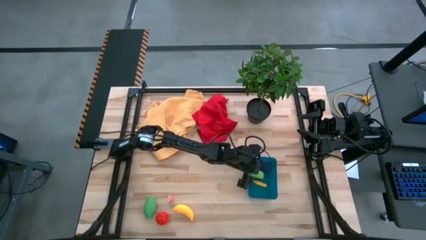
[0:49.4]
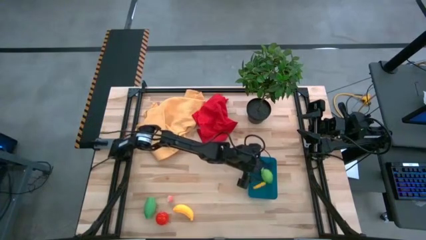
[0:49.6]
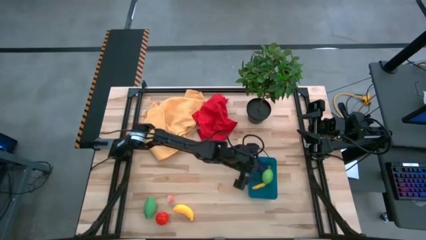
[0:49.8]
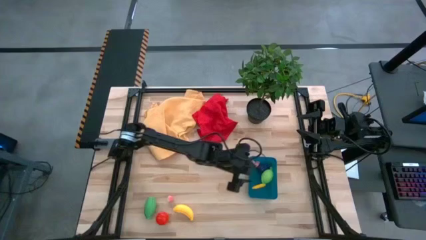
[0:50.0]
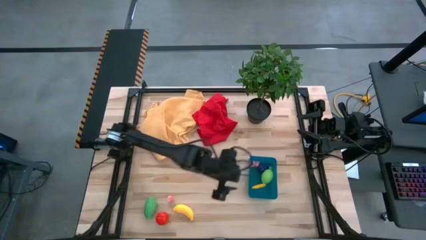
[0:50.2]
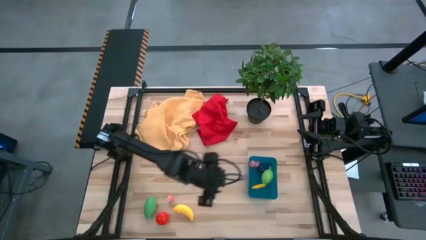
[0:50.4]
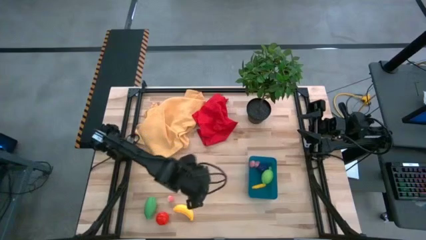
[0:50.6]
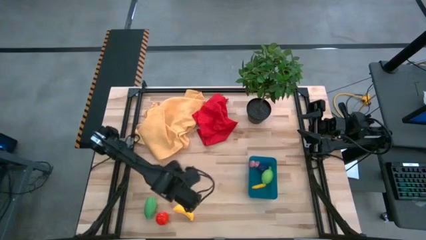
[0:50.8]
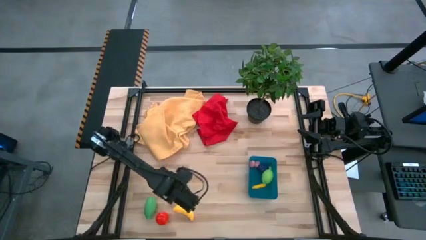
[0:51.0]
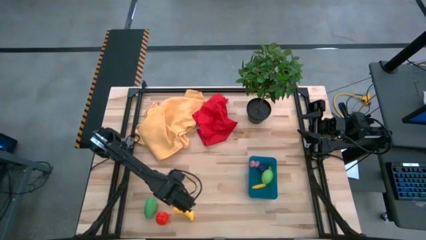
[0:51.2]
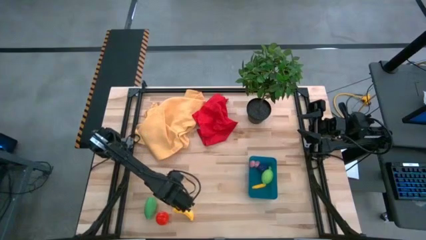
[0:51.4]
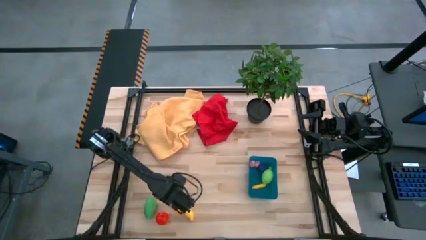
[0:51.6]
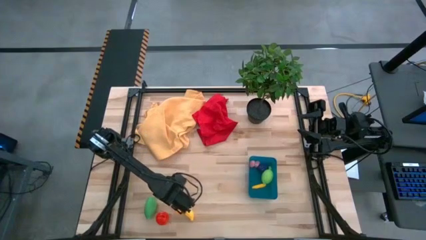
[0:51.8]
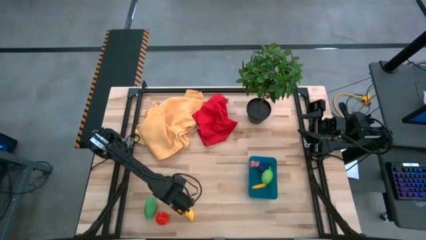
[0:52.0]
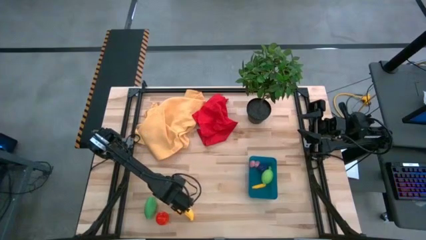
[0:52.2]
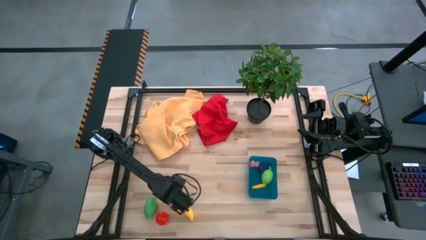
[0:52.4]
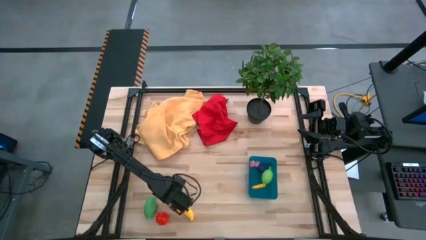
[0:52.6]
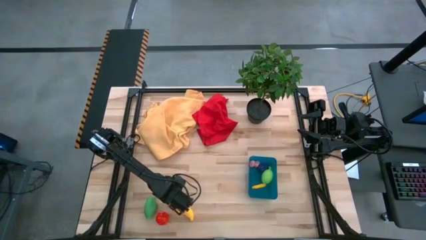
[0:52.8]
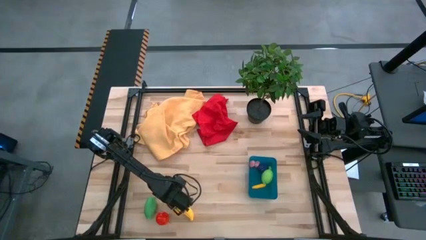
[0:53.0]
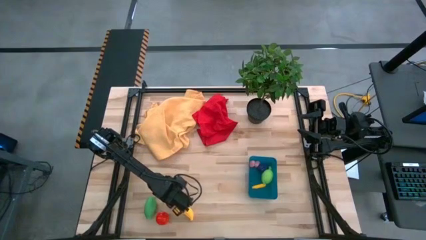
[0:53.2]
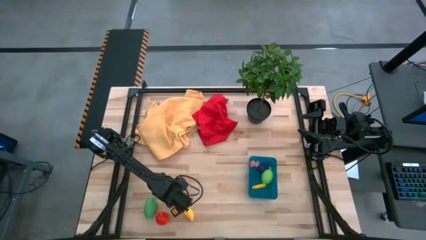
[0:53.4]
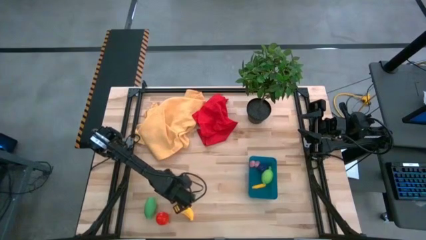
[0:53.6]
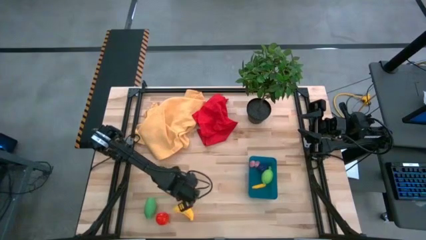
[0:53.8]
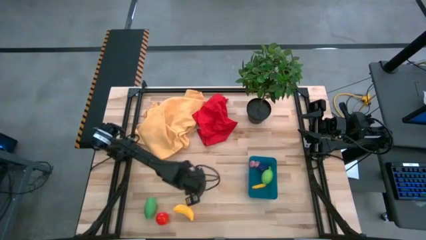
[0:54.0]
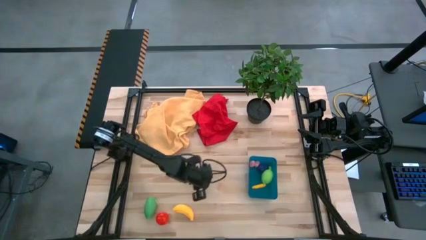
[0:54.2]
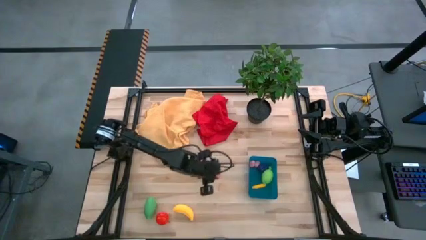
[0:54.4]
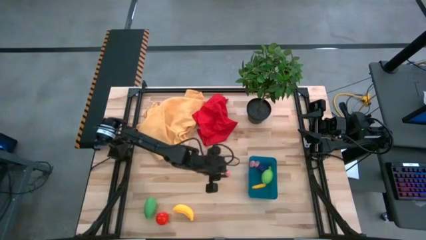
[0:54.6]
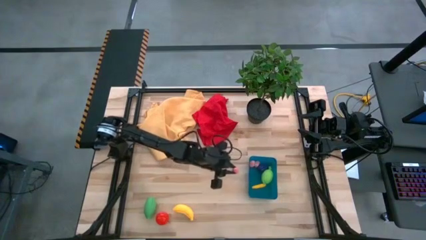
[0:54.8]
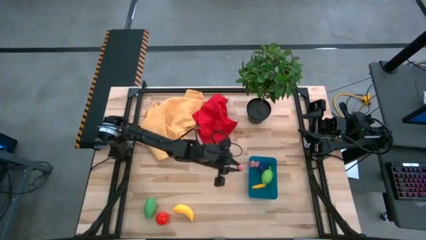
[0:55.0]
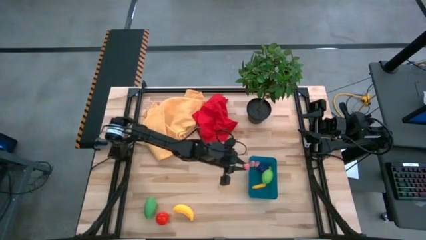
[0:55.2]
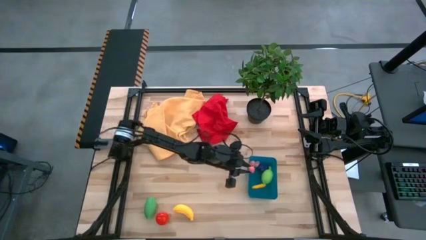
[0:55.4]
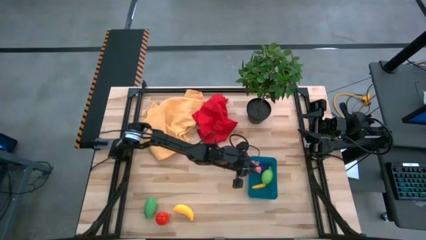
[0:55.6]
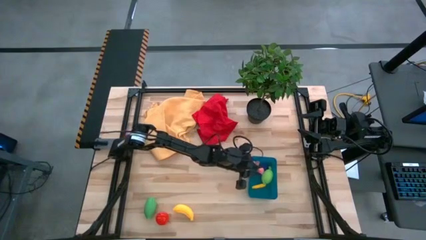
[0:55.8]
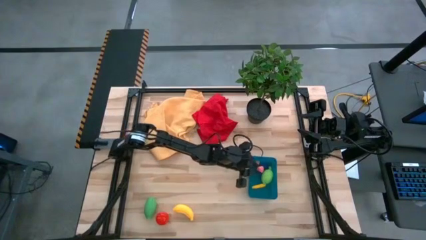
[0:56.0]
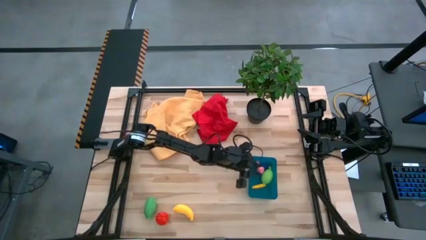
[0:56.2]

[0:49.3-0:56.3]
Task: Pick and placing Produce into tupperware
Put the peach into the blue bin

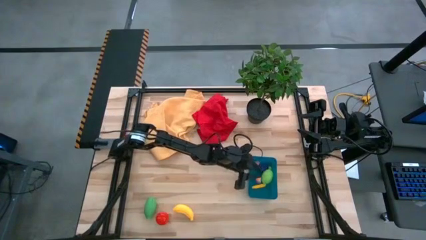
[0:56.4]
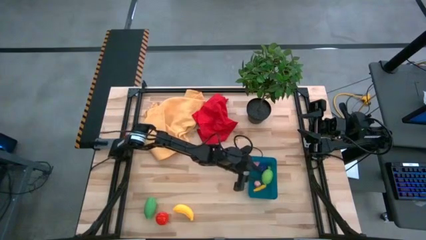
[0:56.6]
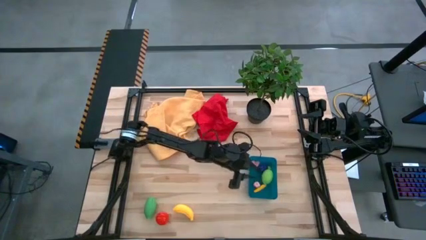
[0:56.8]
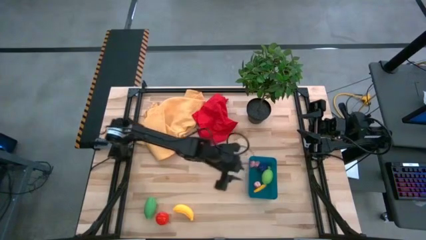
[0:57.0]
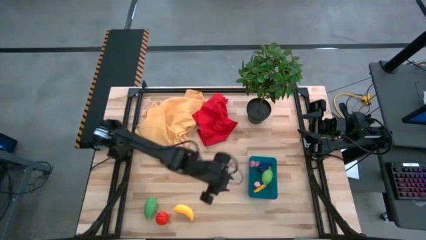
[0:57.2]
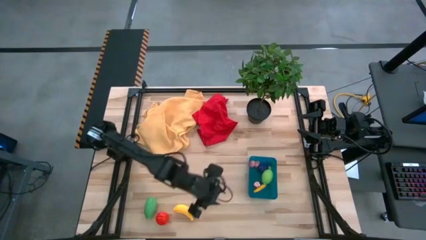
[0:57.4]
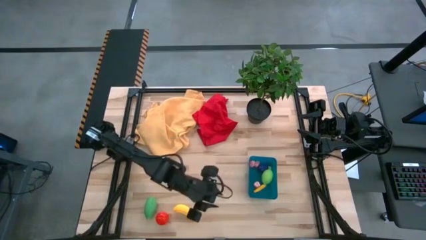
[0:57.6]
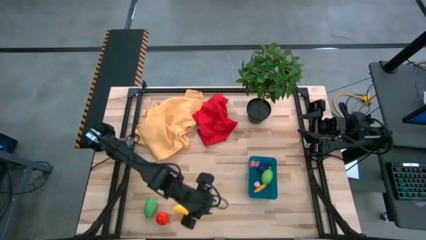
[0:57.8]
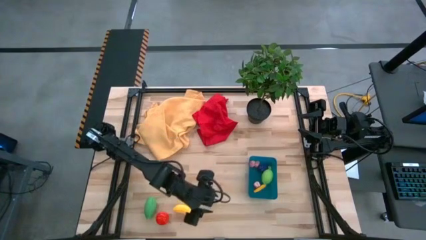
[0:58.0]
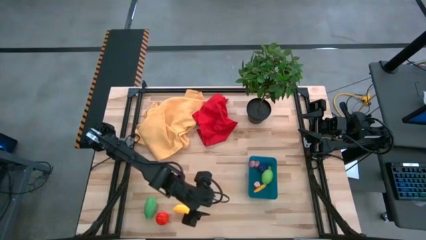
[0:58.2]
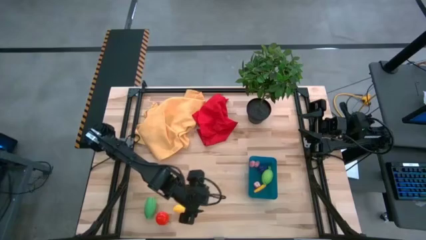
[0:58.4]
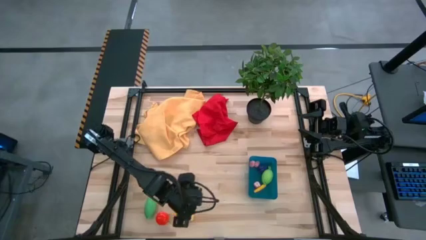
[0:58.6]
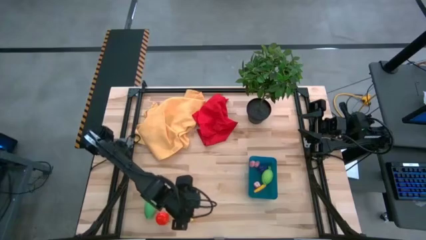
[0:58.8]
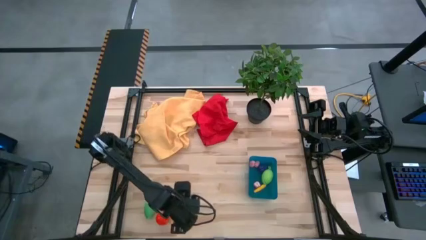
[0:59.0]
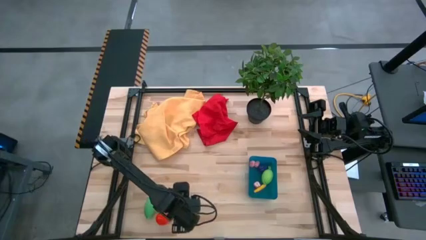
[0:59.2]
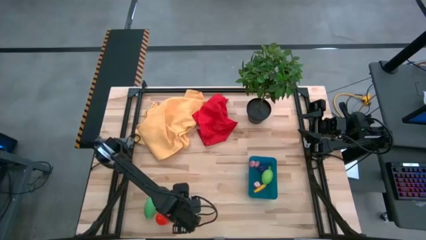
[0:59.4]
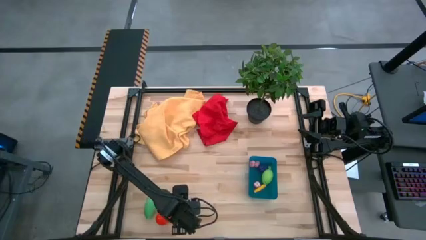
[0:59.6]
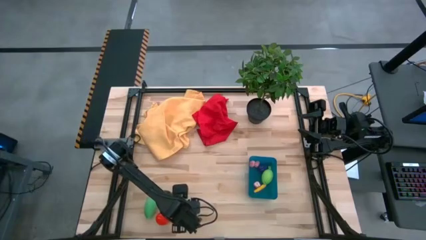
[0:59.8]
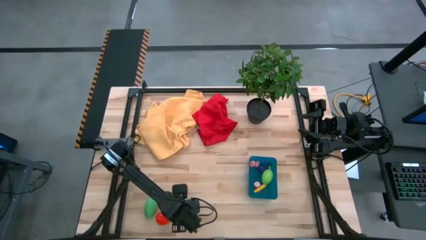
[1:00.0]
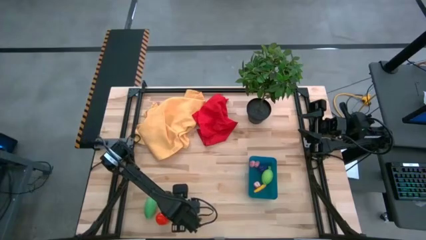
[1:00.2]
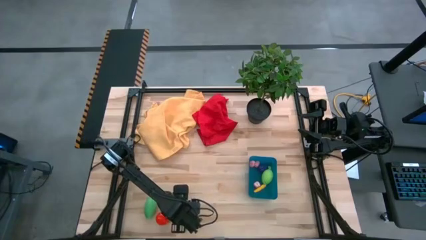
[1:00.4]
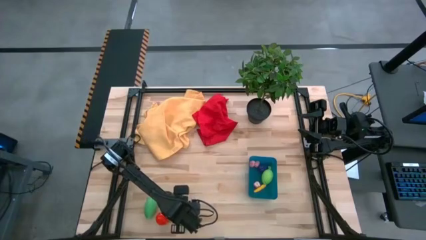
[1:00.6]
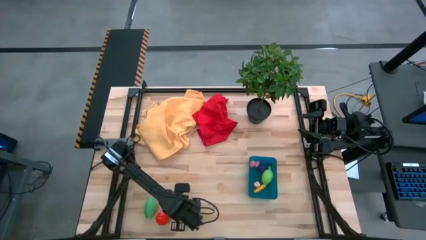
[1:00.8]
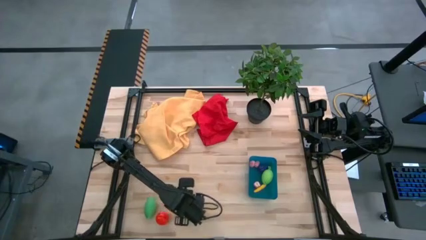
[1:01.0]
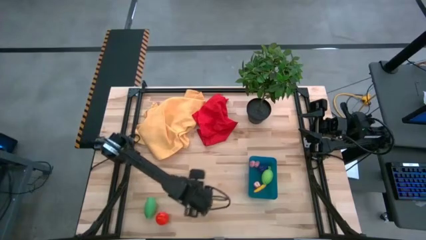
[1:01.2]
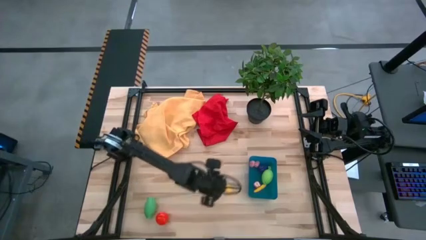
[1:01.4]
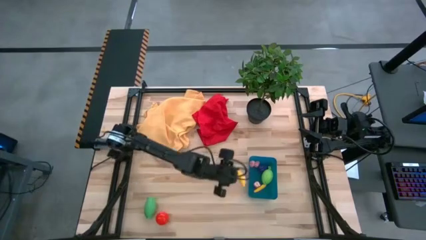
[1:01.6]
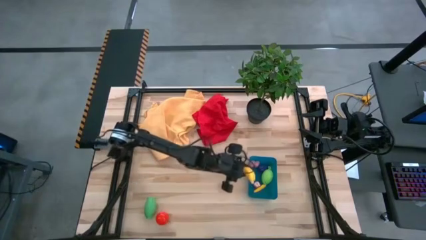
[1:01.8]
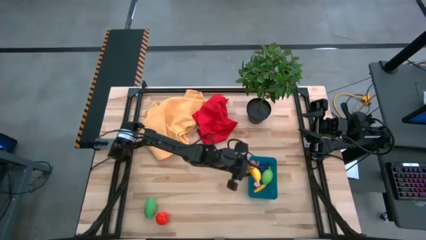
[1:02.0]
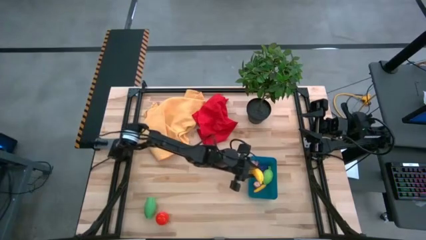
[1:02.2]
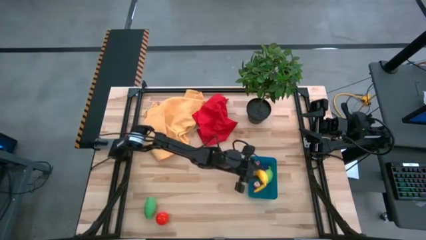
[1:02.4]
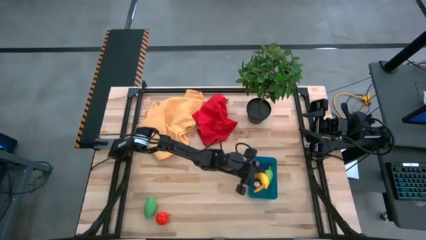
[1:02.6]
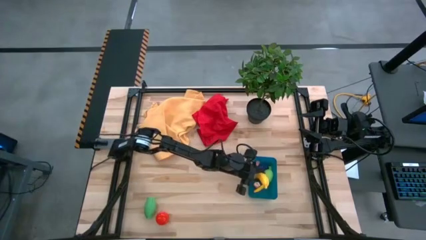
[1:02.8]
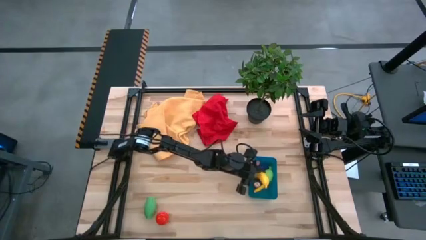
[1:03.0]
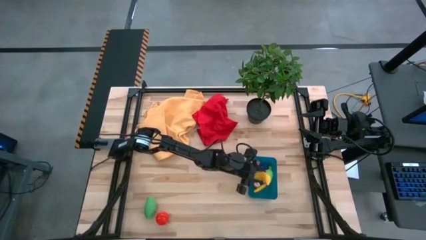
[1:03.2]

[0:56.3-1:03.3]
Put the banana into the blue bin
